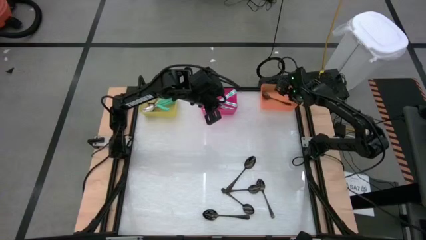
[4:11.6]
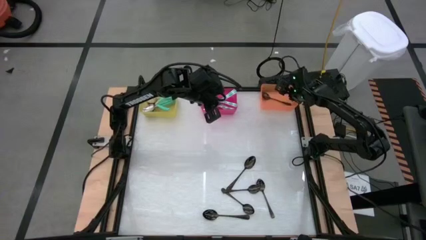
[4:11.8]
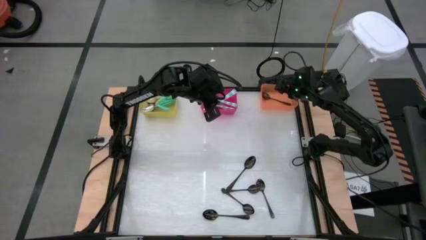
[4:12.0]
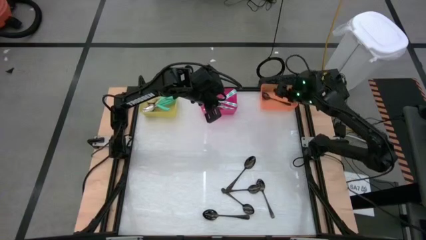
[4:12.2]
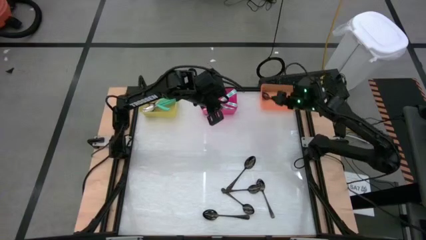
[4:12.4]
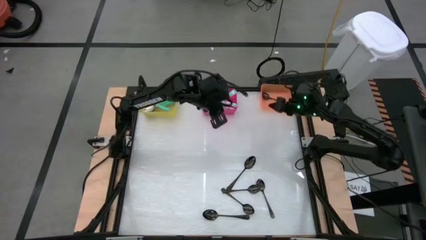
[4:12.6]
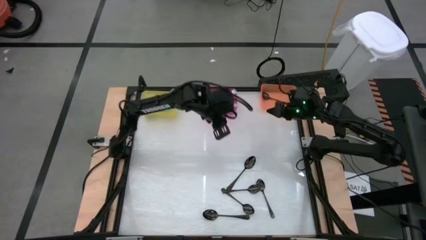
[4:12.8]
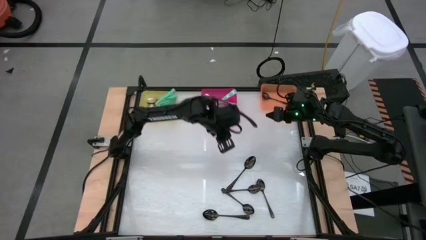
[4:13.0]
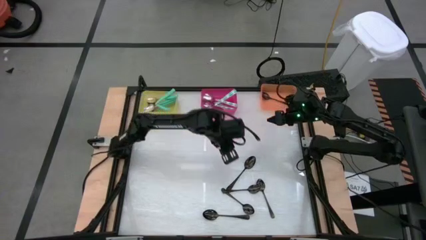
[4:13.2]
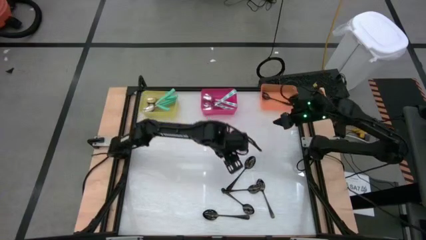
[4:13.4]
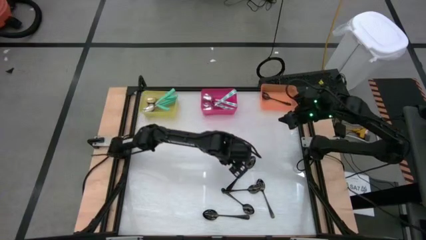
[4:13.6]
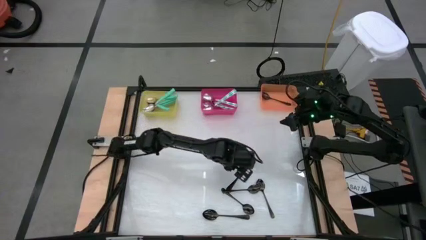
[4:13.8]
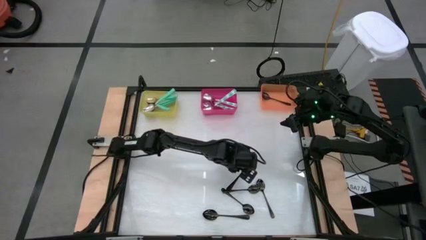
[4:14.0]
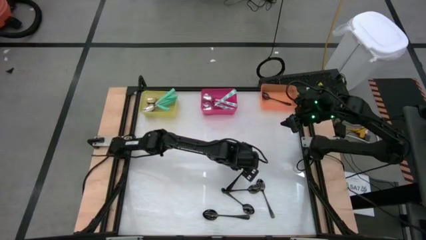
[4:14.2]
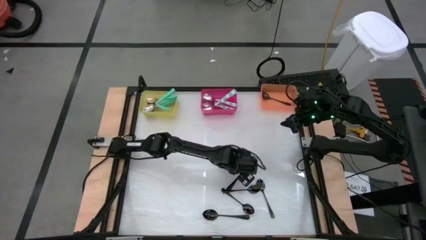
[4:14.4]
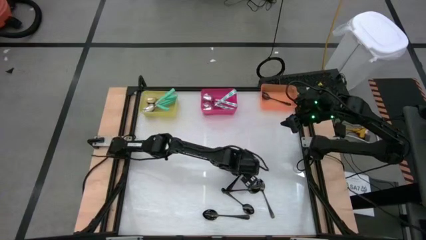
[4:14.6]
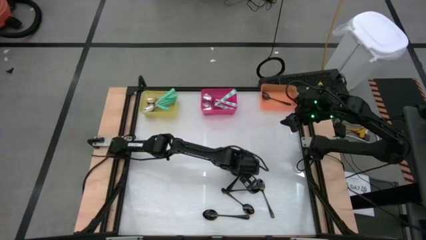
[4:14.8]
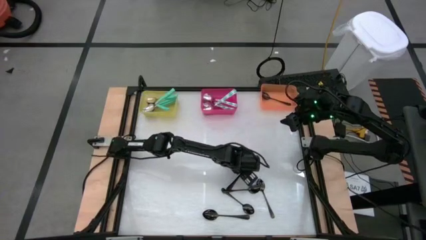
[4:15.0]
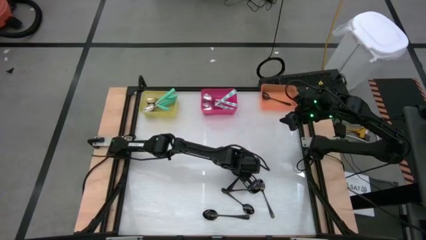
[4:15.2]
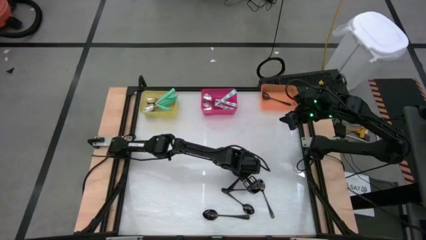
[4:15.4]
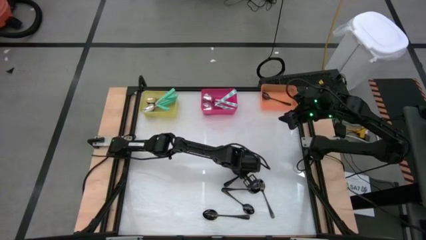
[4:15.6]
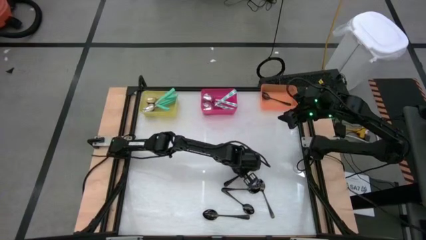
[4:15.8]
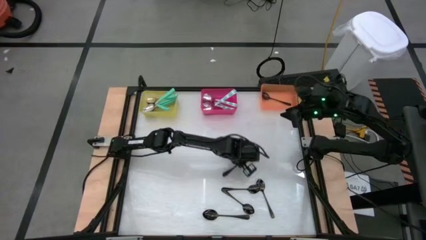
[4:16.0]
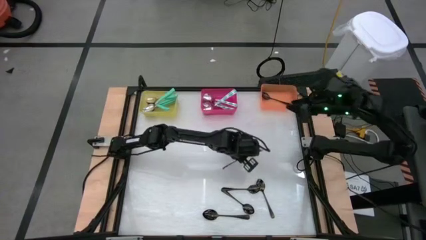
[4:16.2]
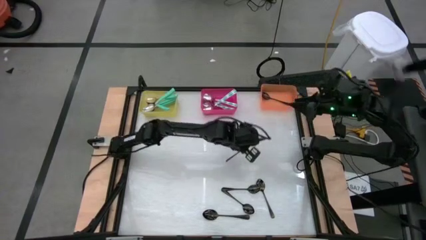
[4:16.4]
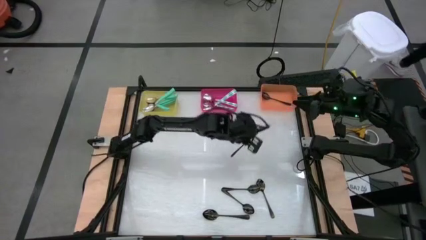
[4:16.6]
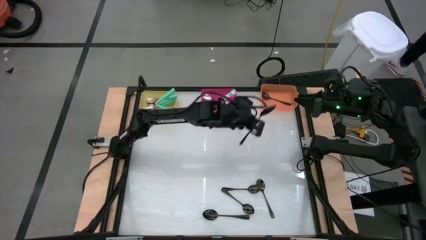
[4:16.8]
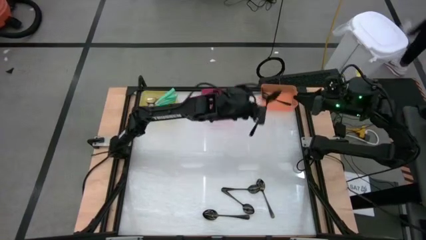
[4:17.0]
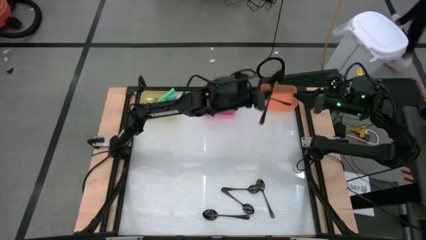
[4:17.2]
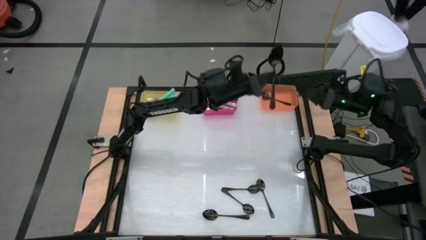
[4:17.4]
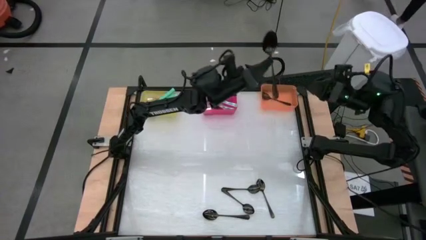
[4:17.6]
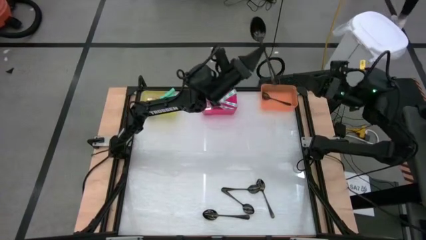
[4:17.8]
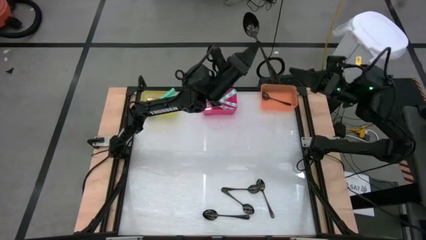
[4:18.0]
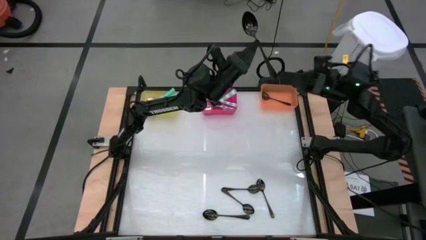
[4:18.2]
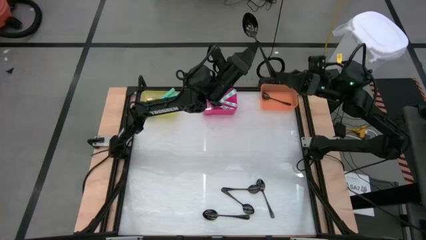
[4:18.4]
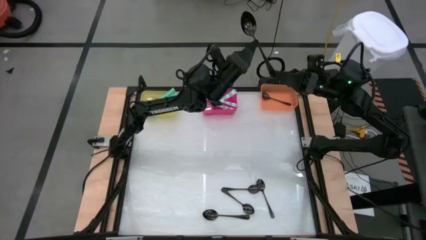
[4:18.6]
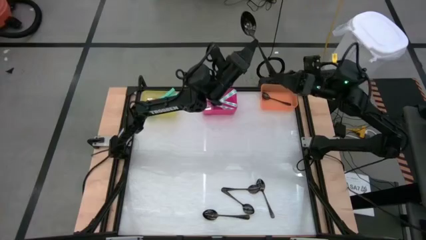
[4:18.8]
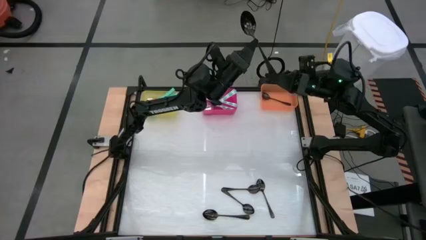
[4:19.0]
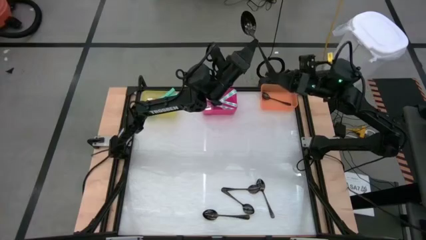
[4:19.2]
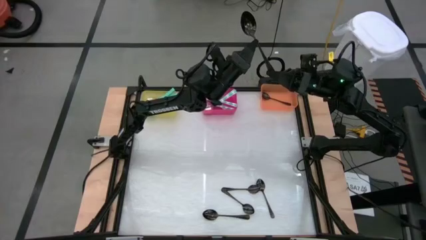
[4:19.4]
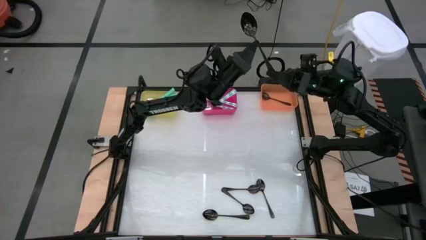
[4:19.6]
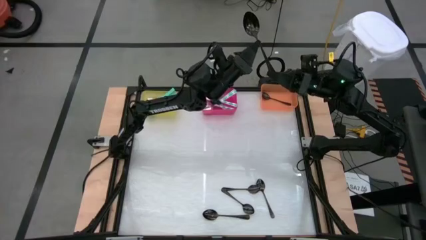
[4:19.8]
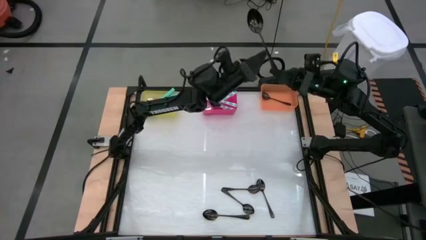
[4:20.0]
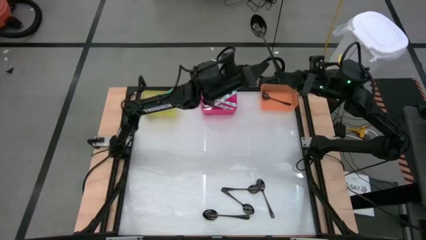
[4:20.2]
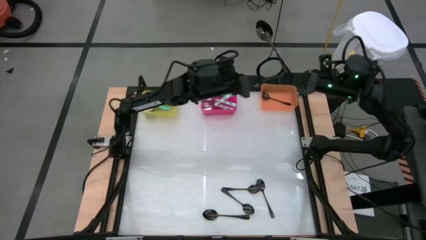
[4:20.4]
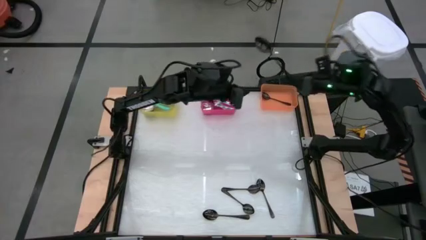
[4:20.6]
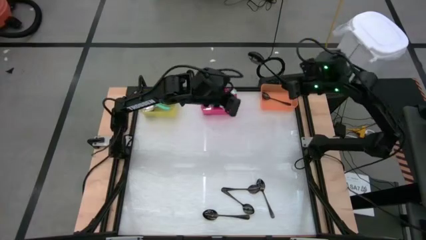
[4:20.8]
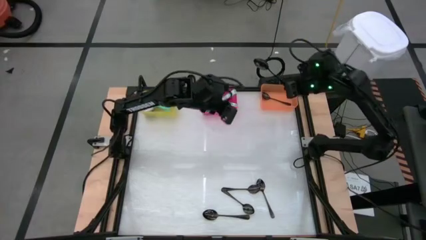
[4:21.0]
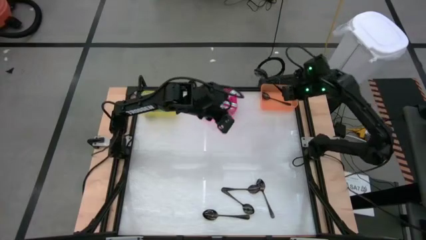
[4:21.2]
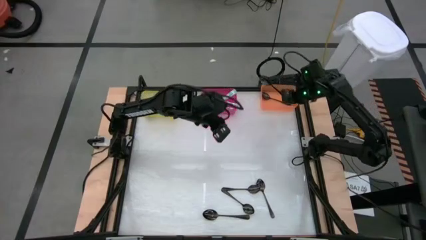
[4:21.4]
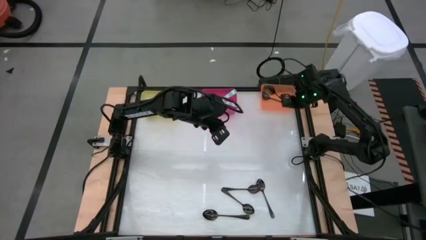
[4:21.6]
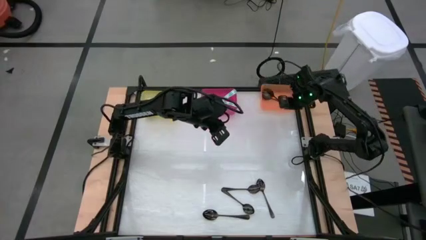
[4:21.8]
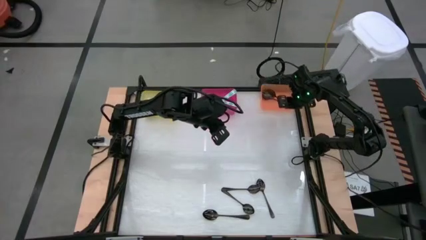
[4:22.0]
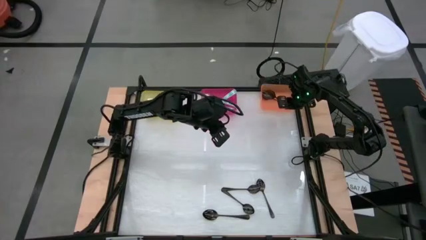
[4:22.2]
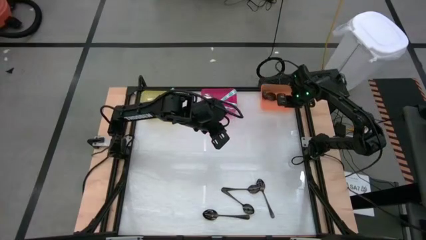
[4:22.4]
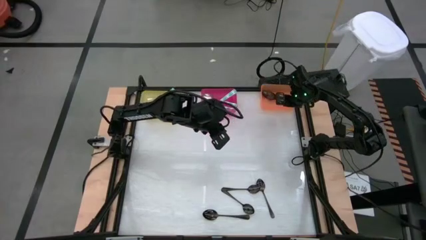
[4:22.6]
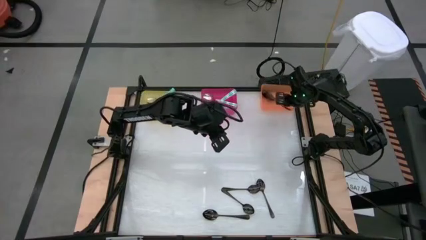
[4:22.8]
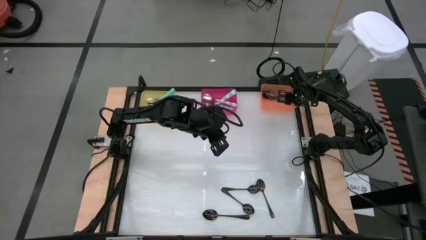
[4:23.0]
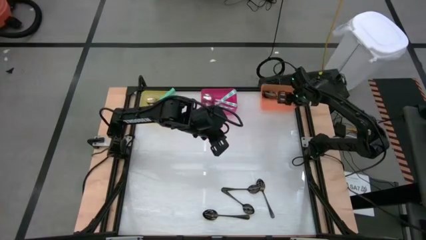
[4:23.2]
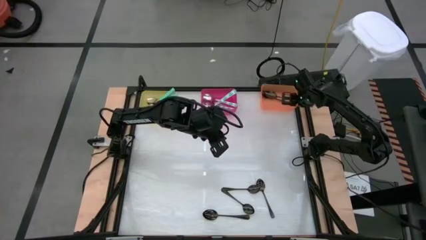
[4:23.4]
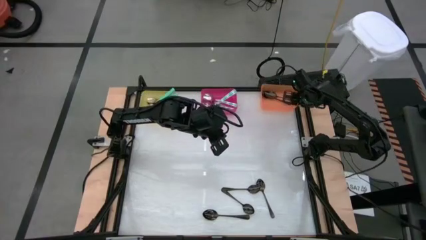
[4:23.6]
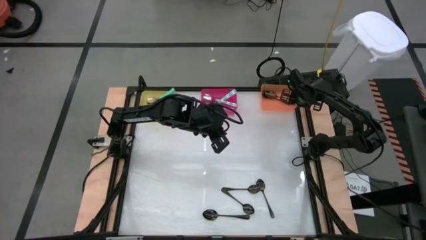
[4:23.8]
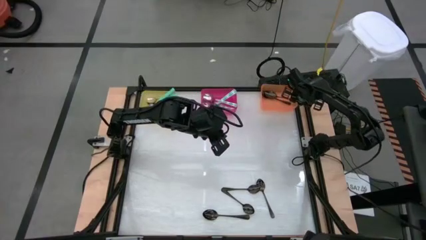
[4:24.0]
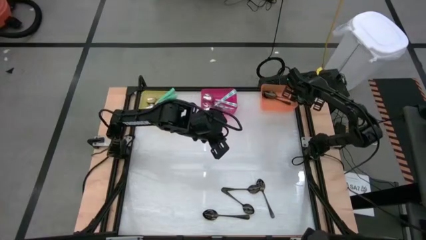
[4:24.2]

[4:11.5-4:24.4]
Task: Sort silverware by color (type)
Put the black spoon into the orange bin
